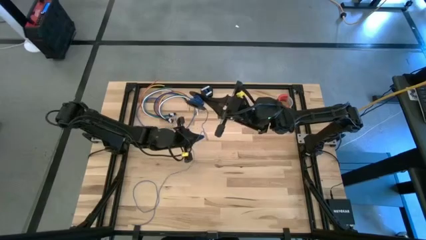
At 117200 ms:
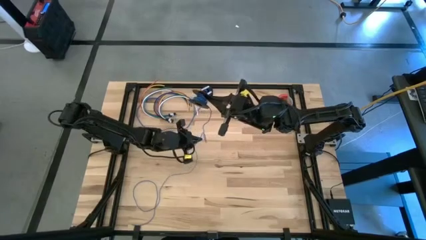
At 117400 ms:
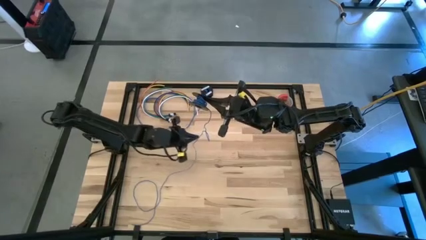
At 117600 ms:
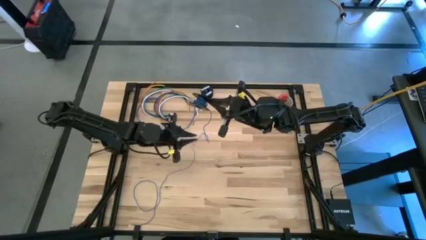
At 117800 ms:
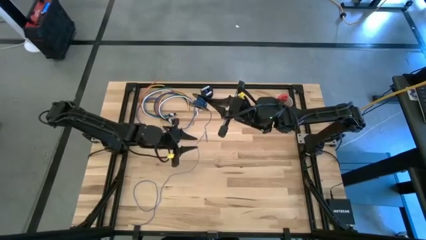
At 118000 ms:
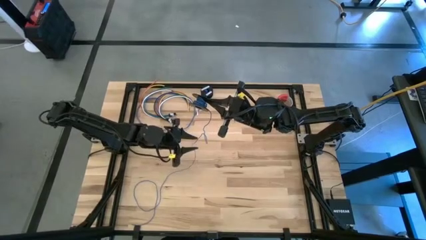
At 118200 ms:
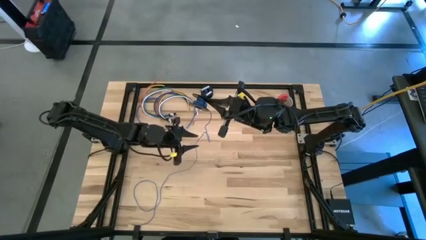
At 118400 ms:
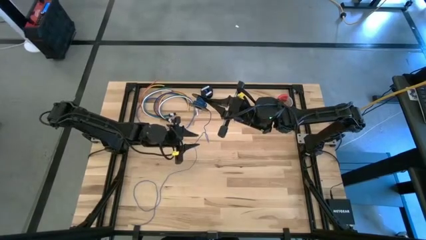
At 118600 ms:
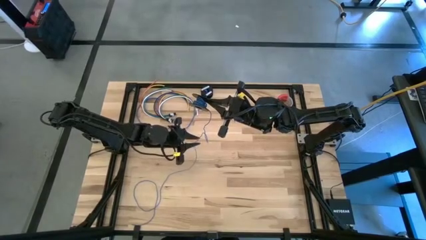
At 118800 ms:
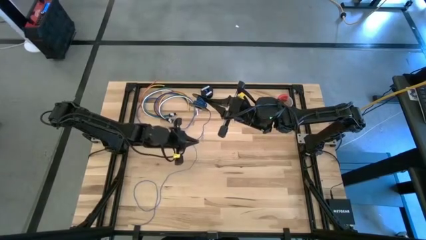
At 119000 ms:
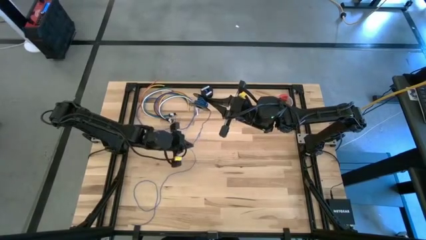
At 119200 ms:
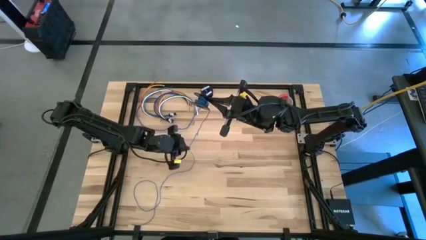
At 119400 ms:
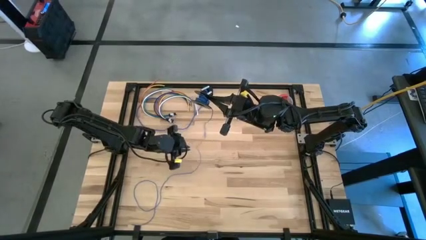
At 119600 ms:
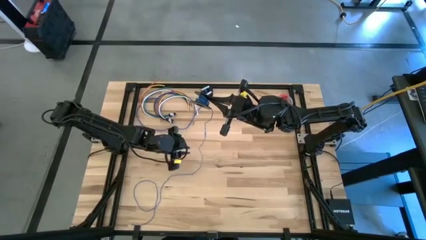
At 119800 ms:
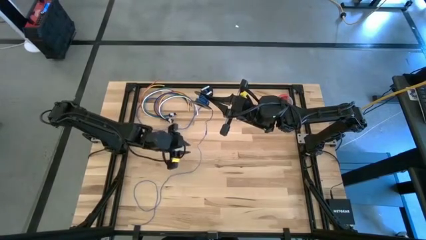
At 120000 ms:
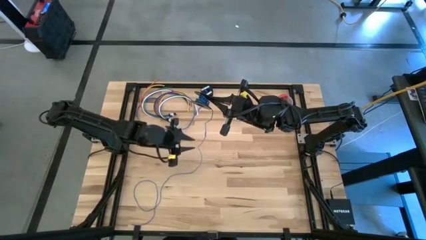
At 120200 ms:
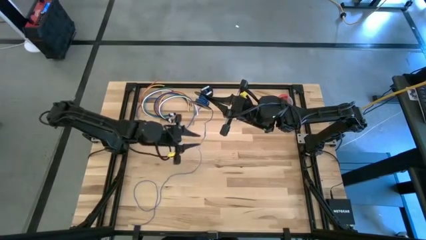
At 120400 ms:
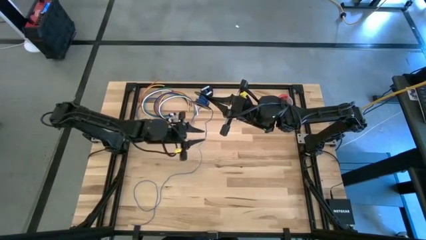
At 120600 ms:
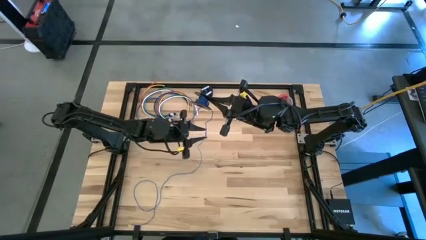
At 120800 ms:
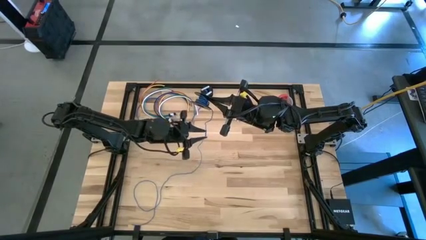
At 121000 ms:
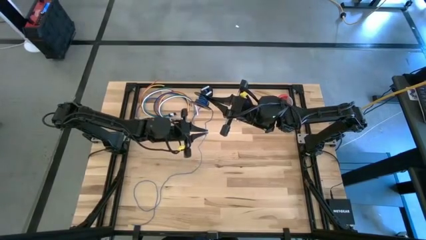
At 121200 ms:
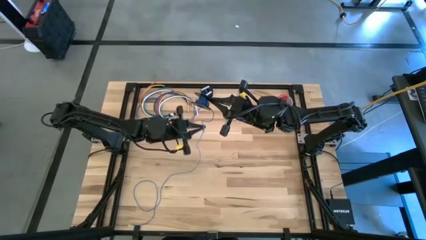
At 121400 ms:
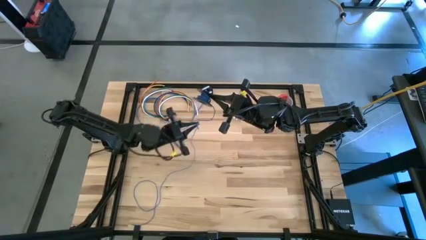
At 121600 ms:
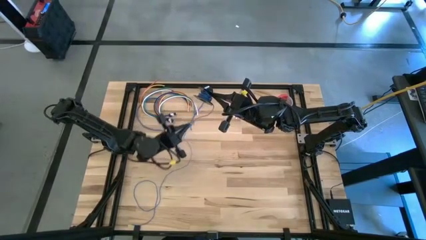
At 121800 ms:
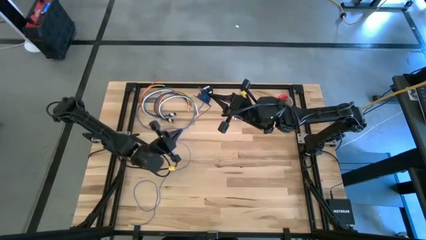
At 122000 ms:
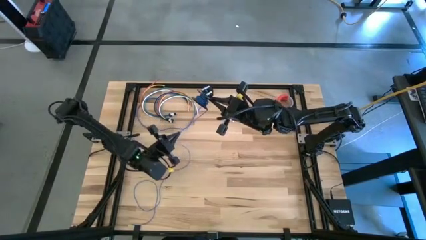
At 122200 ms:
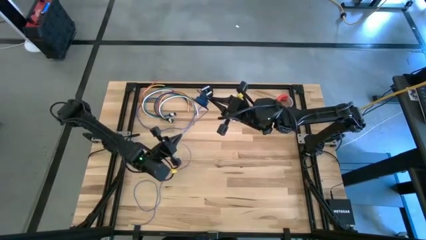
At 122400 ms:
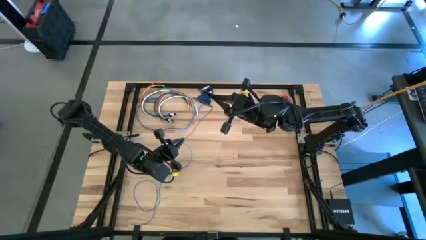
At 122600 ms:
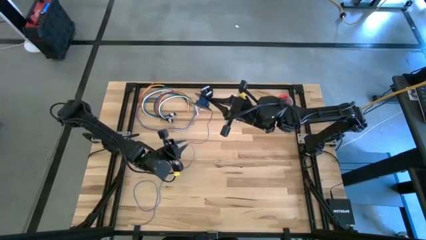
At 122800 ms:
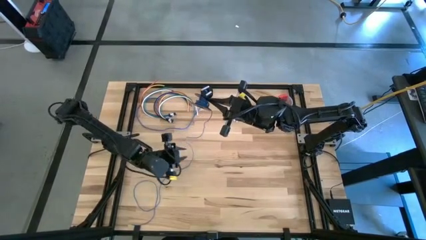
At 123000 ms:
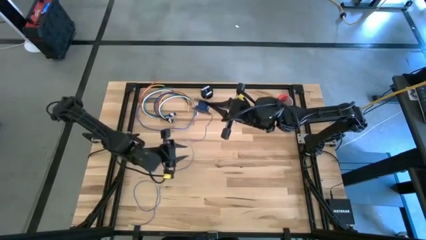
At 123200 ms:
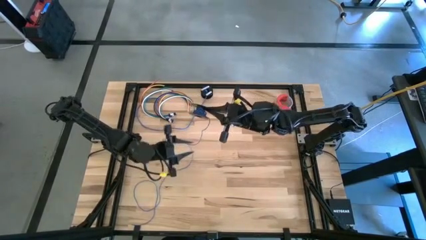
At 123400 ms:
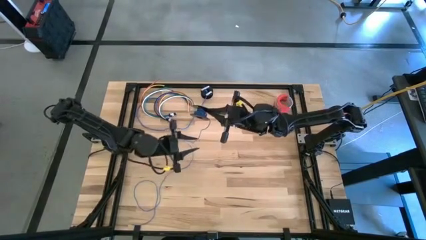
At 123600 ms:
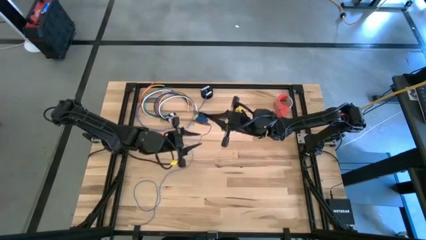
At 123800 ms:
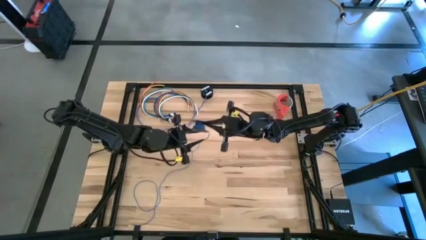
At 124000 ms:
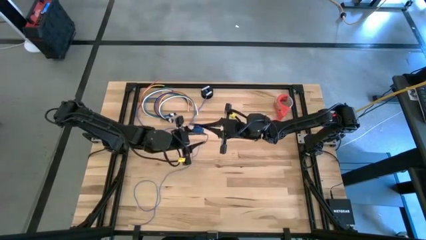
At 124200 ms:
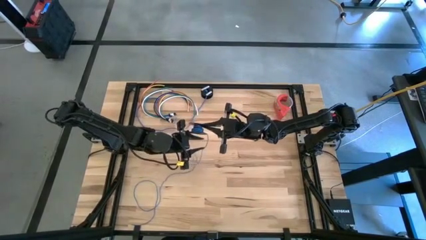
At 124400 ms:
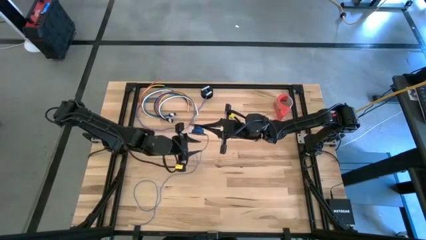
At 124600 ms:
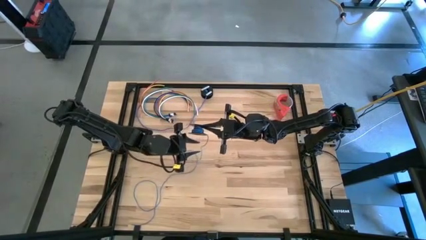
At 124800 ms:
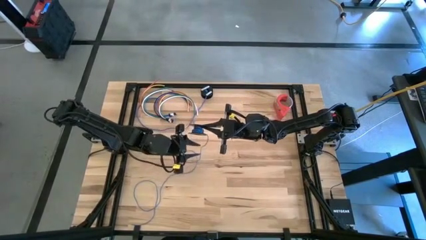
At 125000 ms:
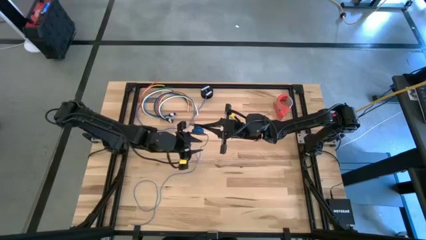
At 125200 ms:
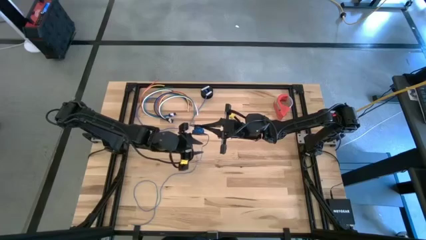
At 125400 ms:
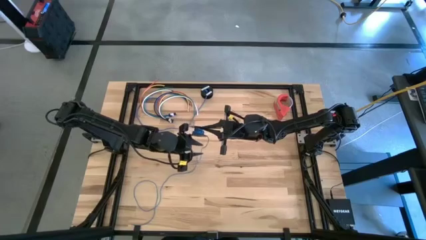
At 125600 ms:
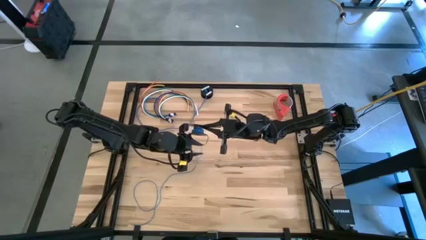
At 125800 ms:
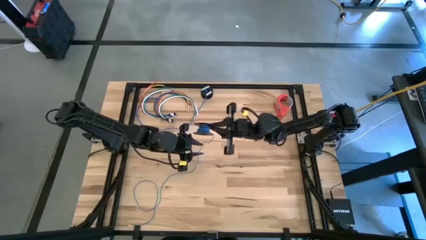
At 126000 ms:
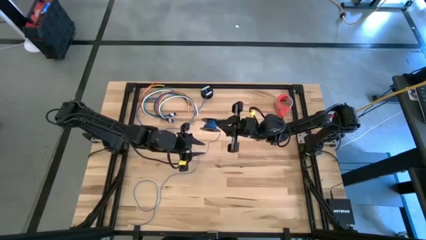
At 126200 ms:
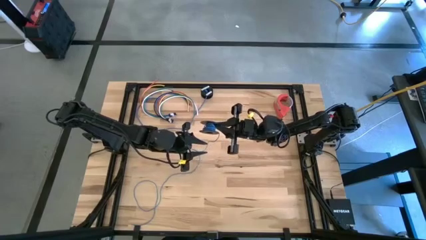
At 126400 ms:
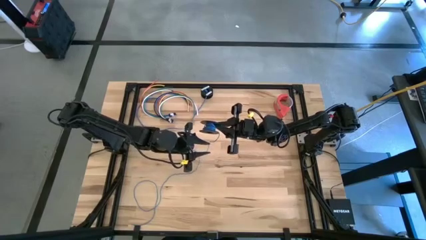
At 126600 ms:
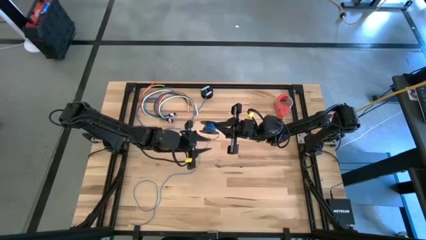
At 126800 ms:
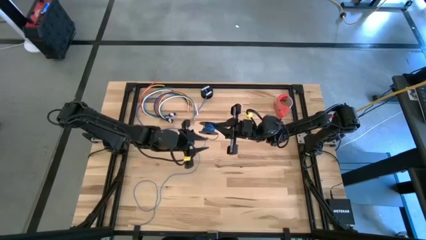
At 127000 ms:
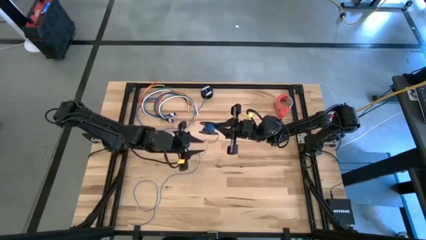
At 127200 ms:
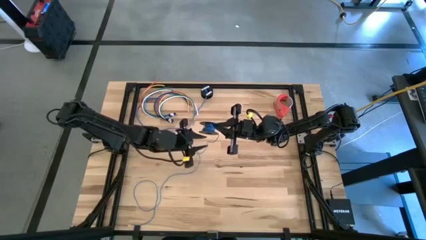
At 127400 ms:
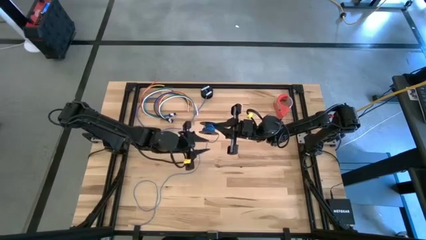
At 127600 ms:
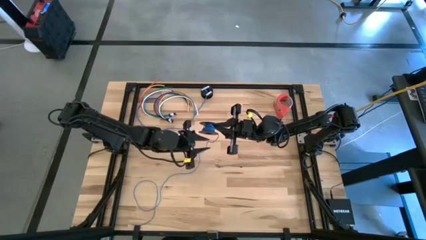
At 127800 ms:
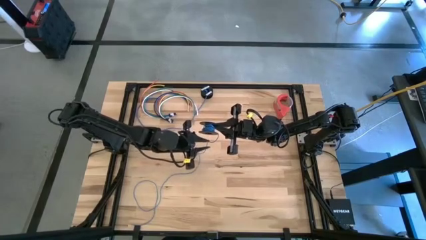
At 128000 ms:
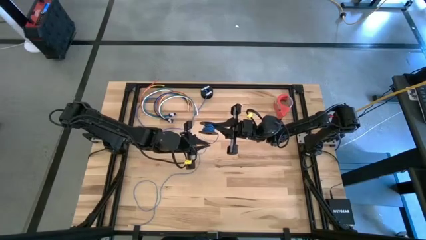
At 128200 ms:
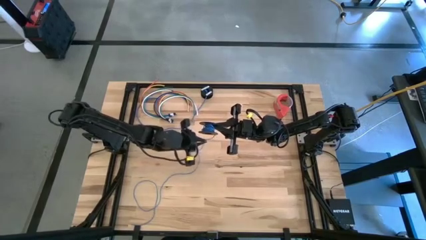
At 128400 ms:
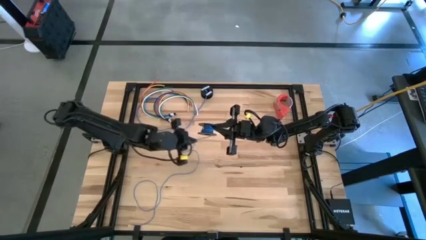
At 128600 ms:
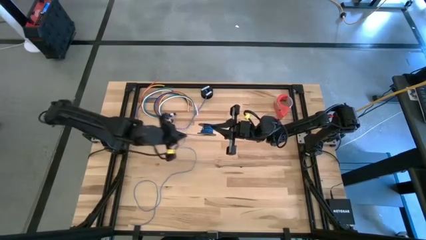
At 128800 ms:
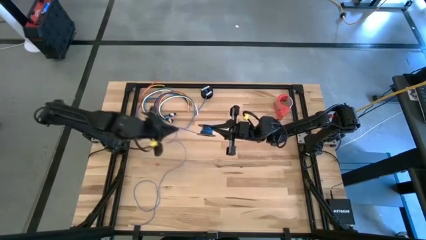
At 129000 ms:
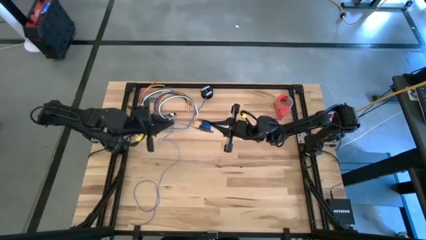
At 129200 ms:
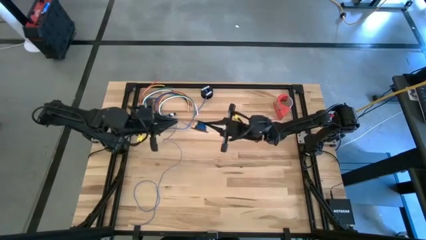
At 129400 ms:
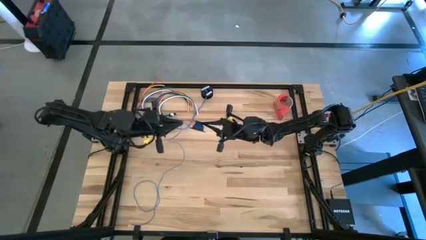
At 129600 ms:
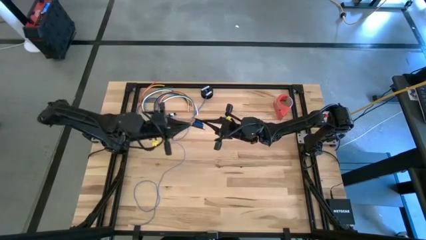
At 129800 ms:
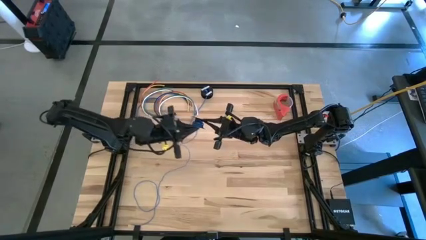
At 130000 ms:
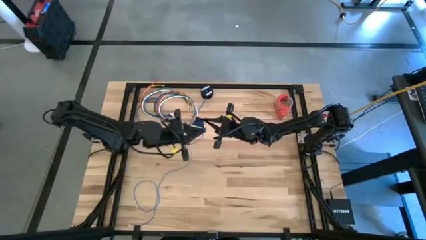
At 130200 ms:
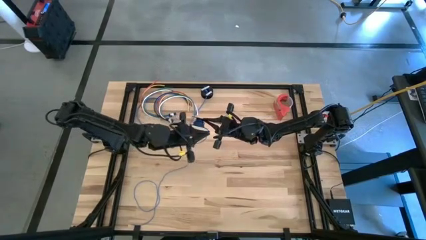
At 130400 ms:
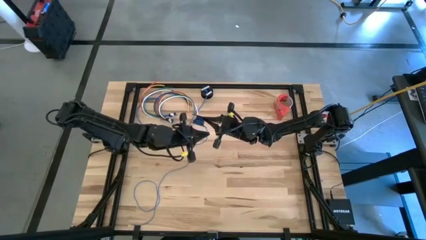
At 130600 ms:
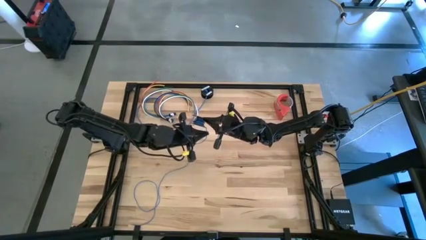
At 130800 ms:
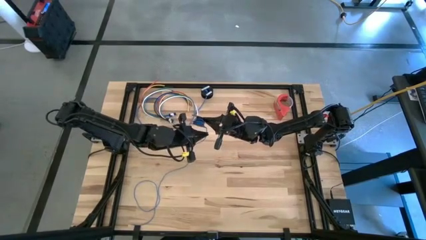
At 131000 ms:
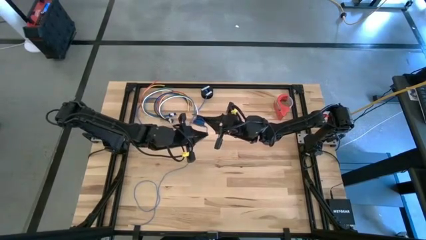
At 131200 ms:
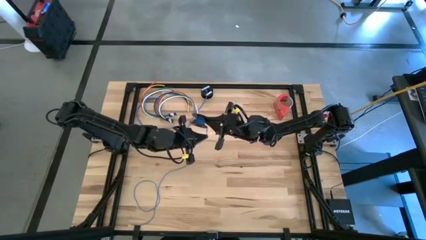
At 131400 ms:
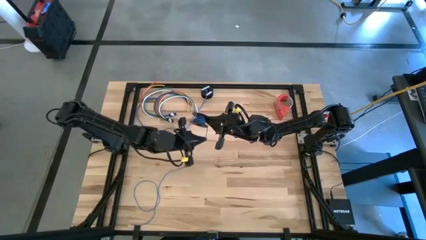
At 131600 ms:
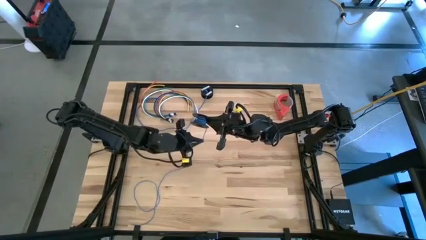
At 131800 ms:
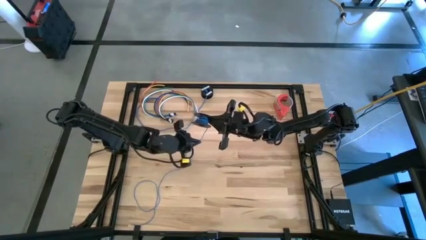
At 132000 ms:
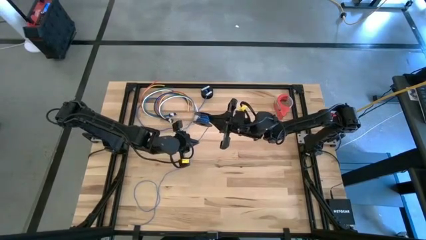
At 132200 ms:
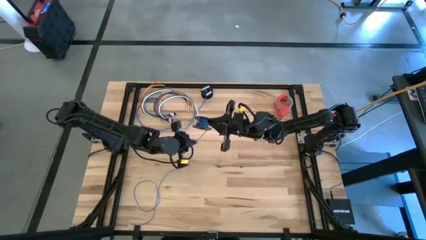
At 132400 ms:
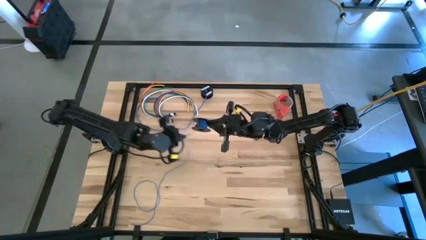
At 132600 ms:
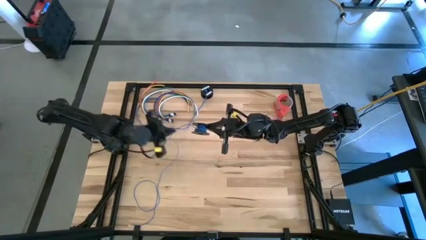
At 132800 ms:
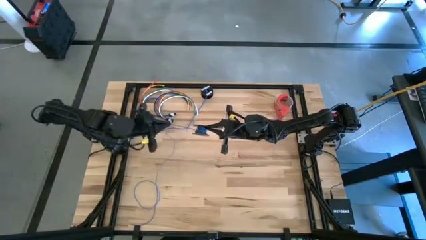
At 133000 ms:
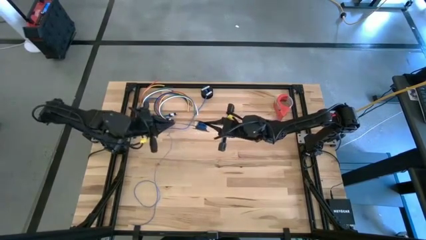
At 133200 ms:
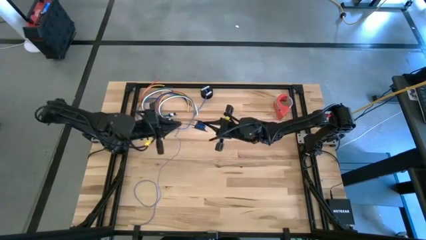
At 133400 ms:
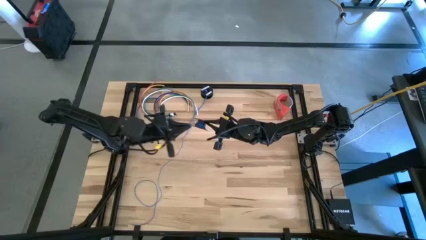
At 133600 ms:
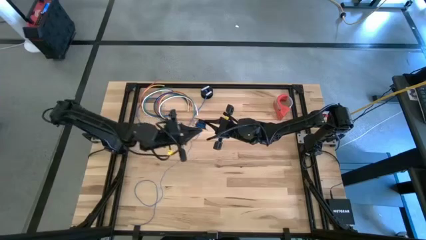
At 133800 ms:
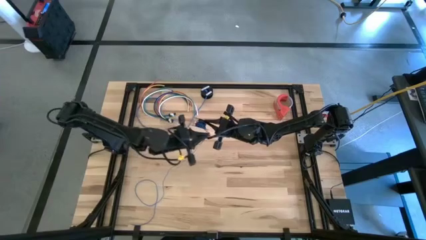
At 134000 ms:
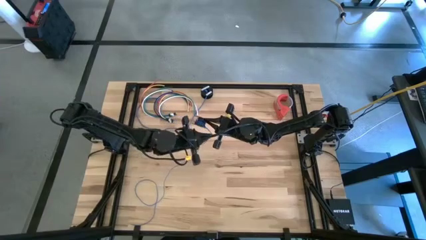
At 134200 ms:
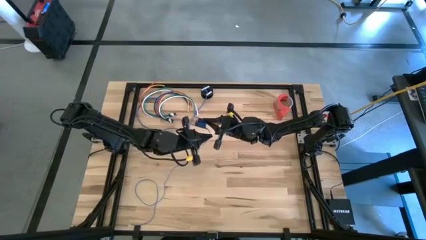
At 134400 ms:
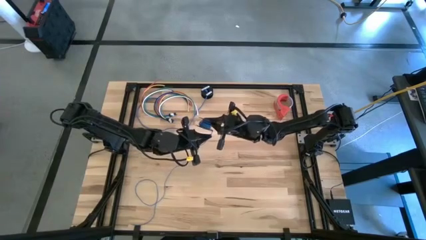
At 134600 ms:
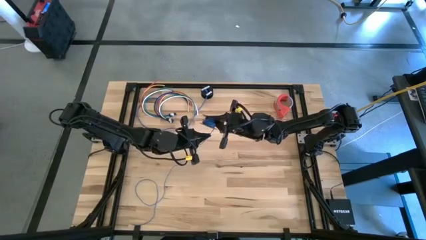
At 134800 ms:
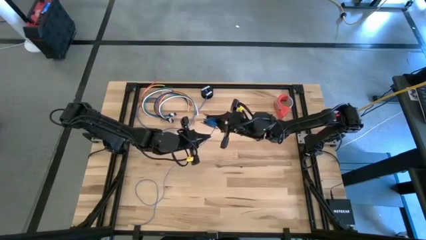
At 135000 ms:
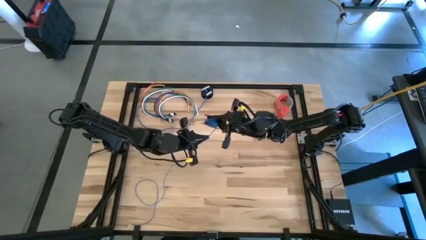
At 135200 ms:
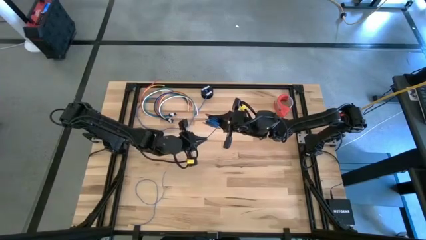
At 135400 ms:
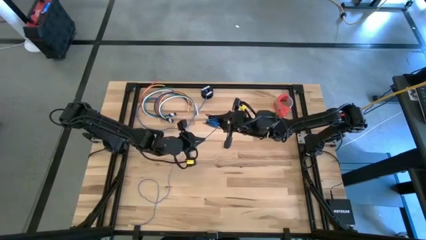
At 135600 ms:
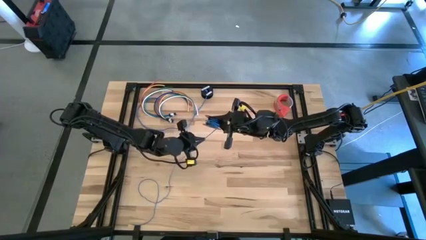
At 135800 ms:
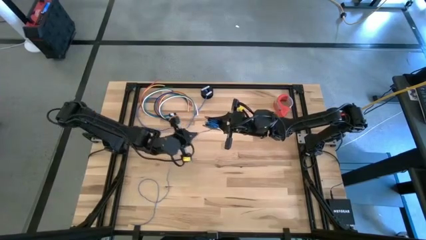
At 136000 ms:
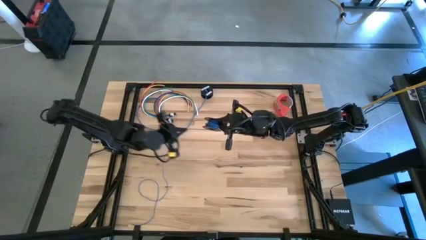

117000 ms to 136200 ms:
Task: Coil cords
Coil the blue wire onto the spool
